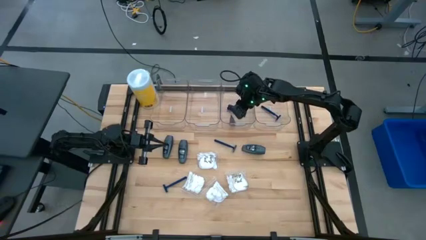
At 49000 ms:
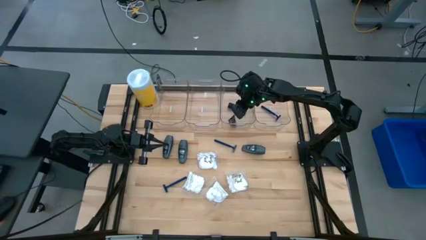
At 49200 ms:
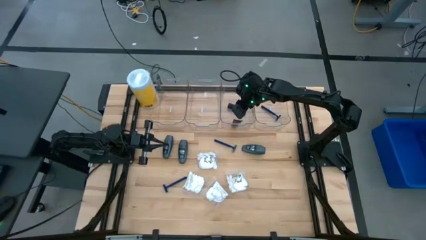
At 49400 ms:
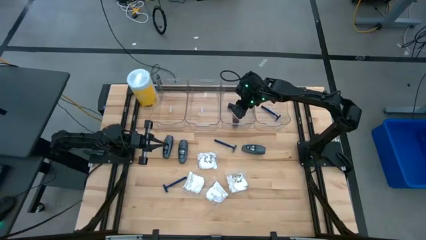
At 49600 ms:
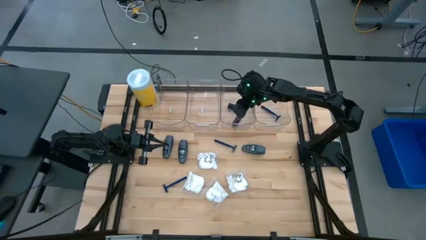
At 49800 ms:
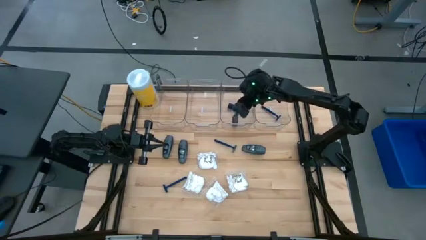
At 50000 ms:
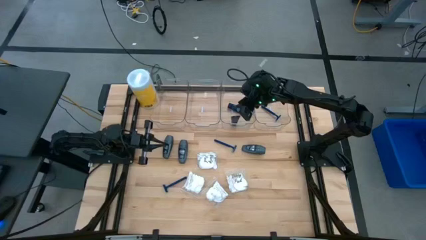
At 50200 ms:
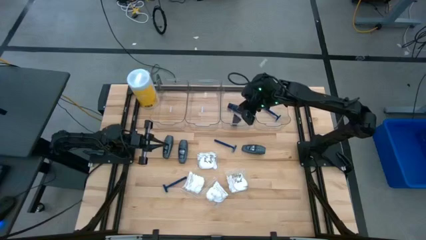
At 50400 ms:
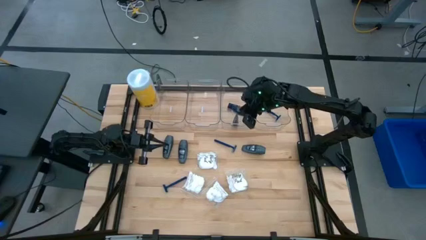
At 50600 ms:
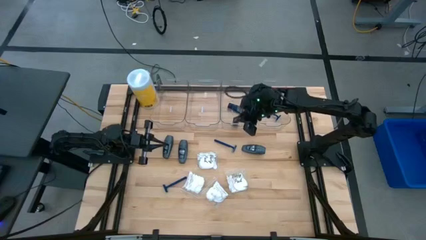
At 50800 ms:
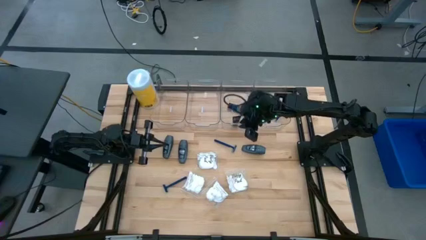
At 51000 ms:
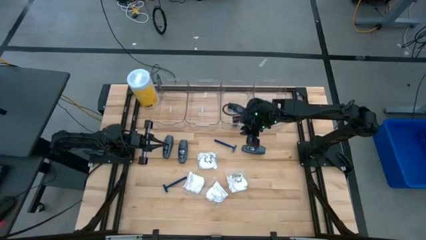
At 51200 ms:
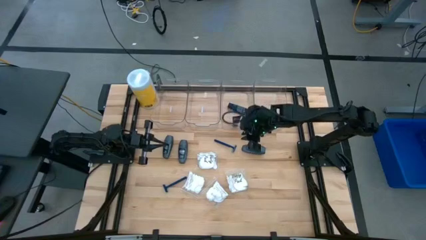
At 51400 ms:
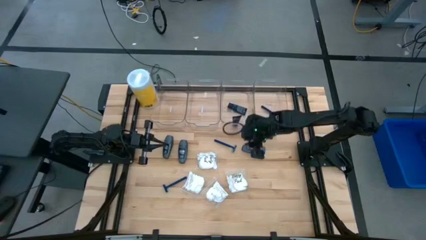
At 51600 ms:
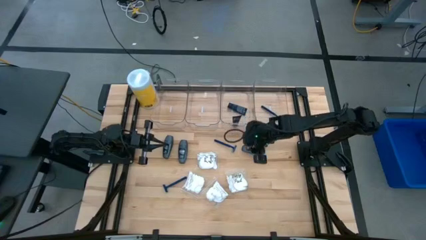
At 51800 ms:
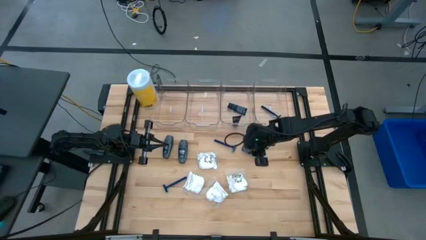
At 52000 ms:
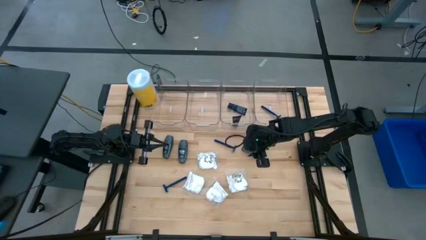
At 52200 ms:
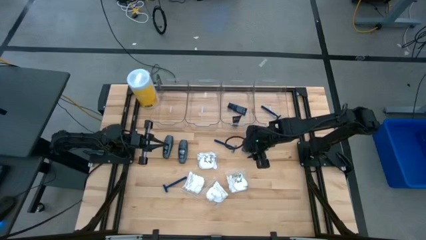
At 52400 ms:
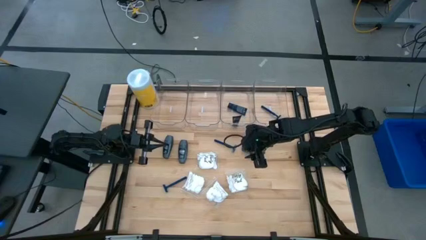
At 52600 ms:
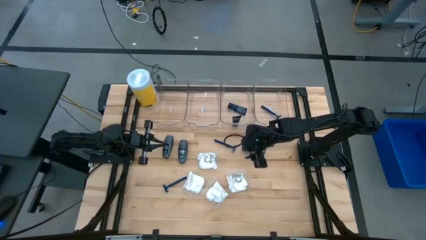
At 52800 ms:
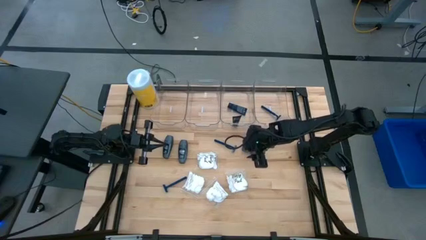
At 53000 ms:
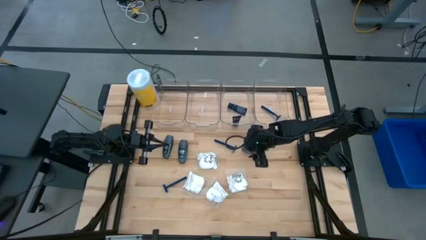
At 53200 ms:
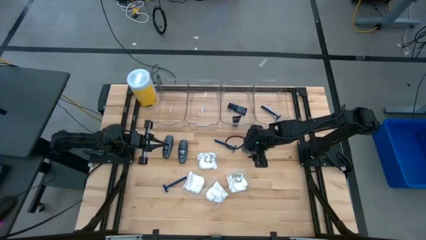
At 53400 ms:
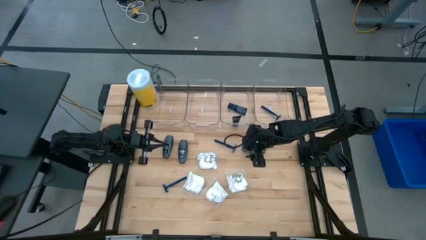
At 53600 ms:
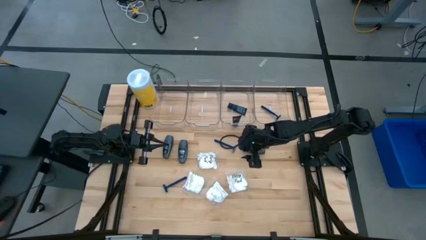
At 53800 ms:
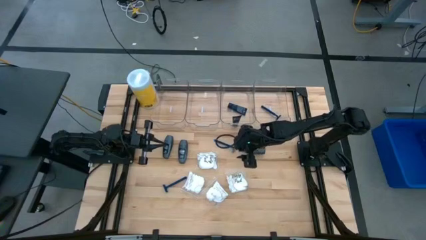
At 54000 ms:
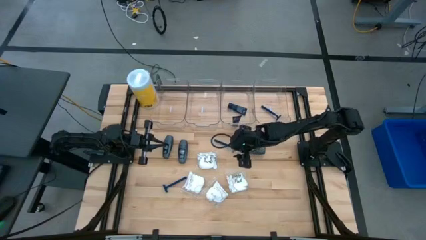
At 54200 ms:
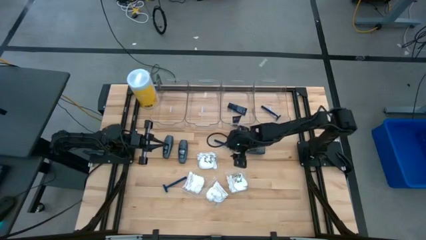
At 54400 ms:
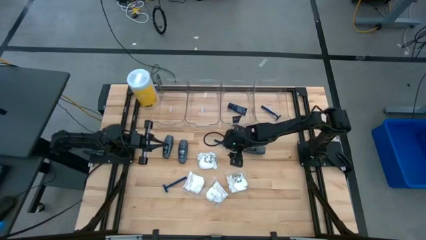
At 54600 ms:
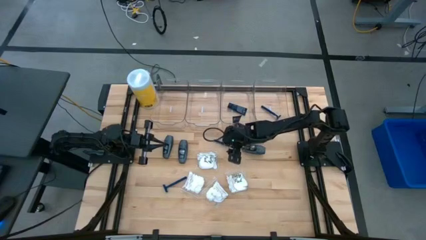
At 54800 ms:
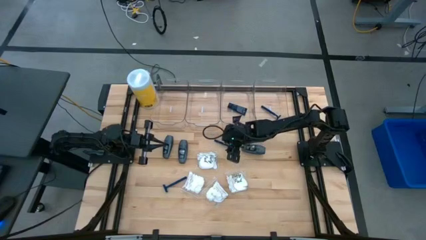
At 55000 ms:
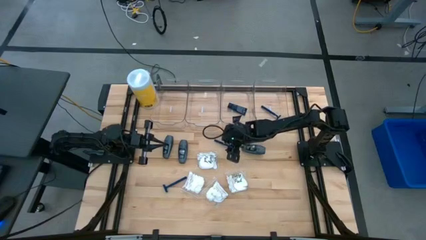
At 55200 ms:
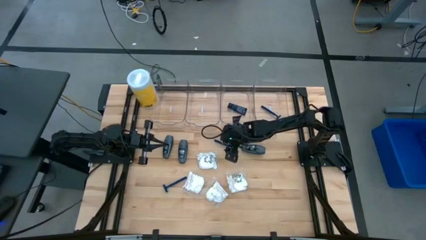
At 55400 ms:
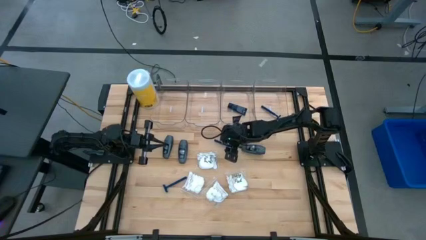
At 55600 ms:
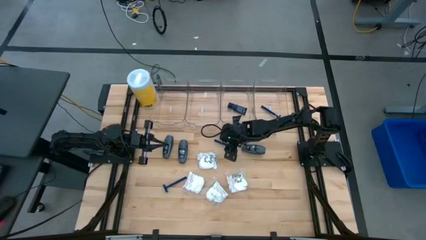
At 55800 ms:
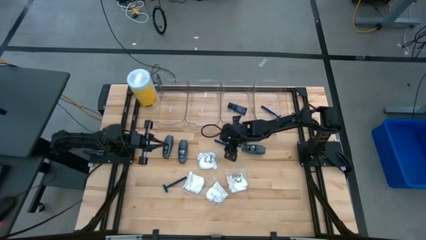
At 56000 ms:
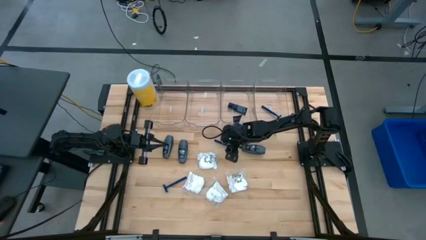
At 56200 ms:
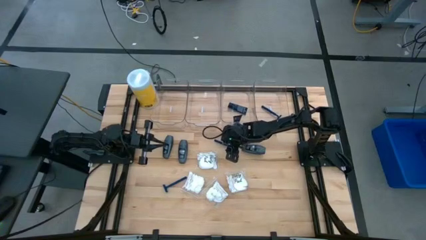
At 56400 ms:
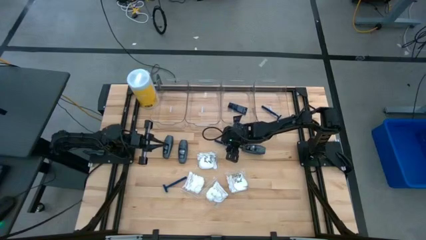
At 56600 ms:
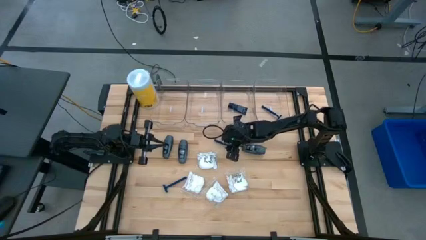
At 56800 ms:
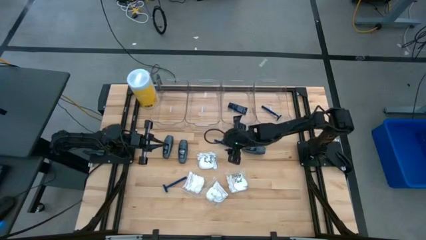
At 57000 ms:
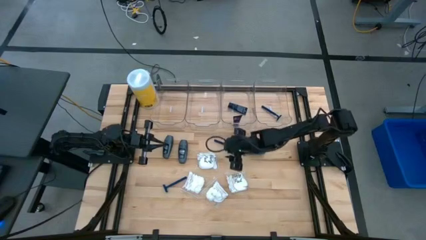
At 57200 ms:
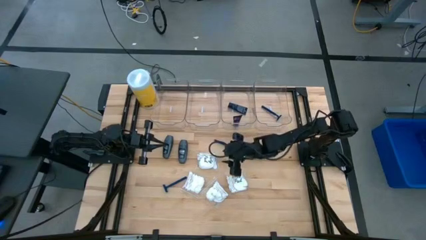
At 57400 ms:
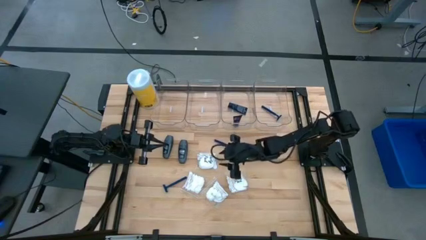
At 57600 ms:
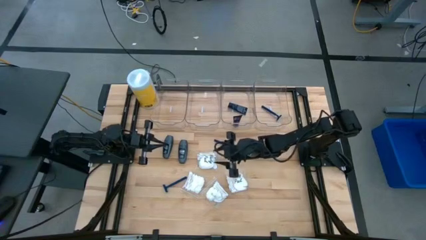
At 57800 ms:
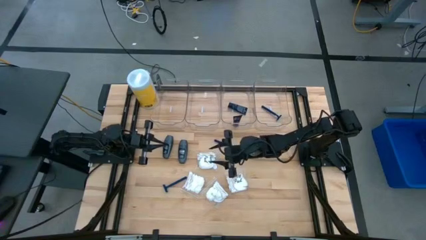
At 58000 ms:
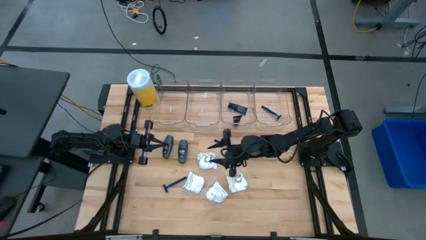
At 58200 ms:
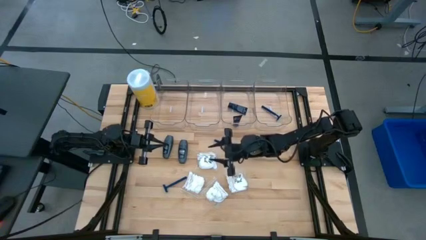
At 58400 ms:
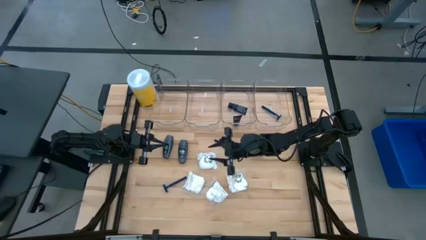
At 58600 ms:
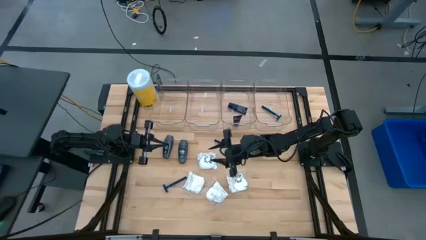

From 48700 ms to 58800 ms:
Task: Pick & Place Travel size toiletries
Put the blue razor into the right transparent bin

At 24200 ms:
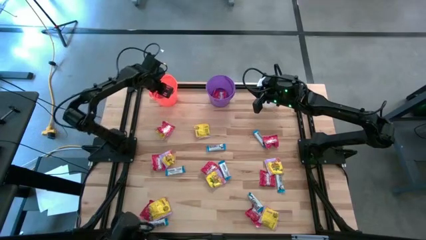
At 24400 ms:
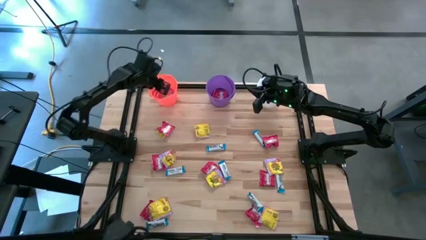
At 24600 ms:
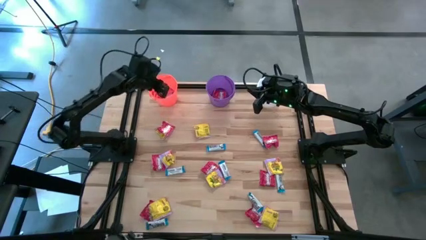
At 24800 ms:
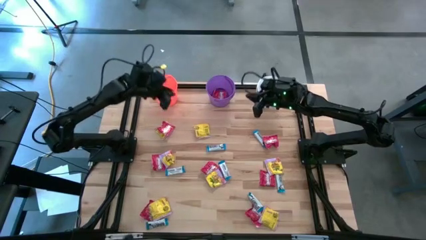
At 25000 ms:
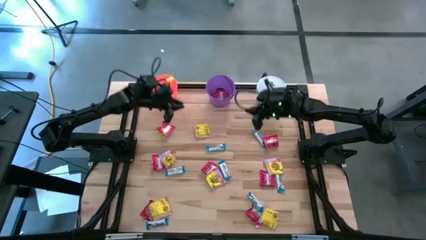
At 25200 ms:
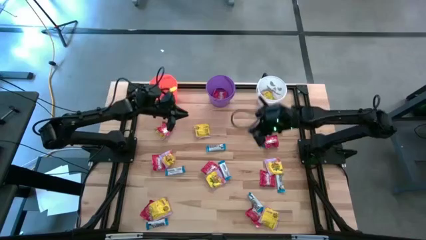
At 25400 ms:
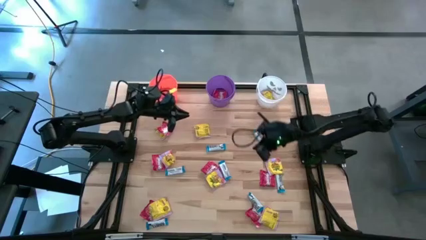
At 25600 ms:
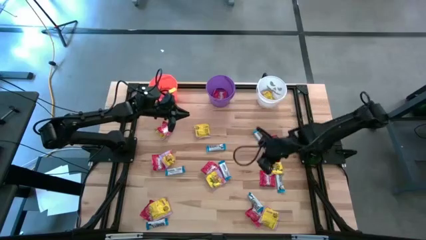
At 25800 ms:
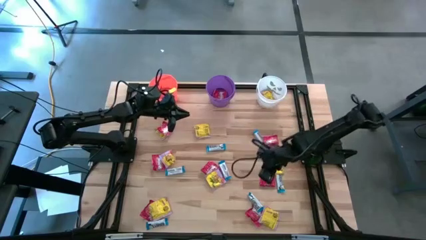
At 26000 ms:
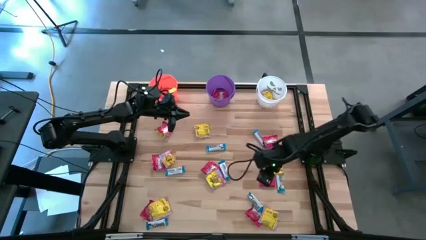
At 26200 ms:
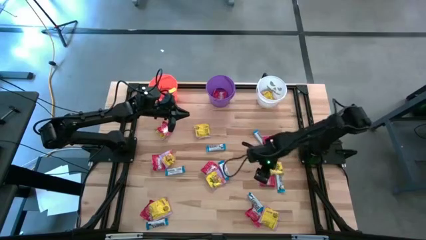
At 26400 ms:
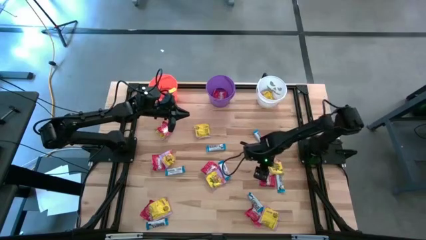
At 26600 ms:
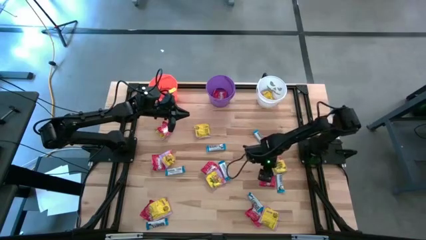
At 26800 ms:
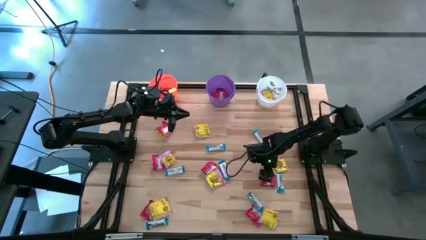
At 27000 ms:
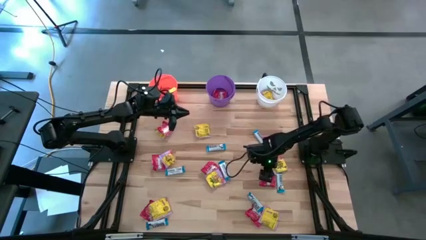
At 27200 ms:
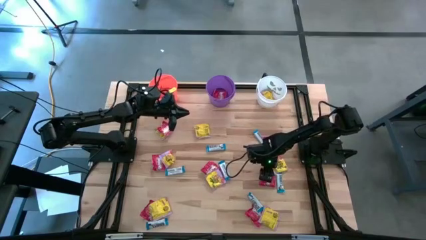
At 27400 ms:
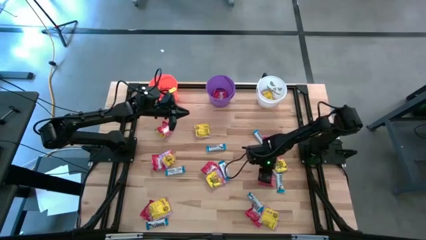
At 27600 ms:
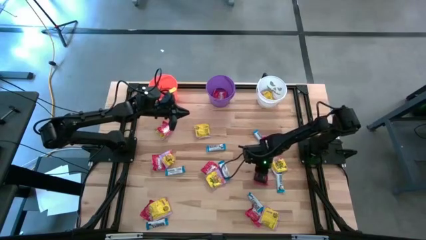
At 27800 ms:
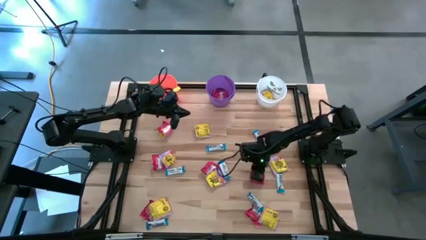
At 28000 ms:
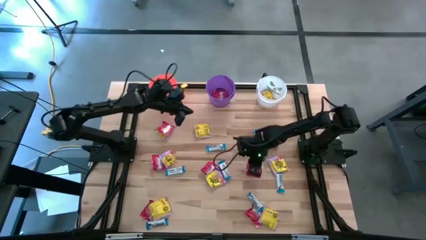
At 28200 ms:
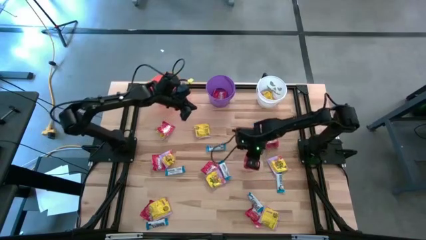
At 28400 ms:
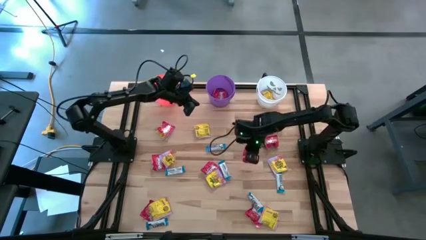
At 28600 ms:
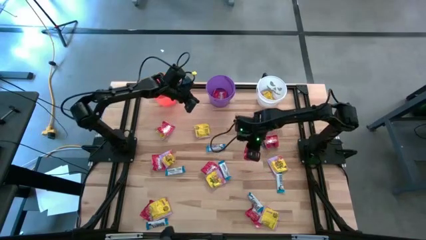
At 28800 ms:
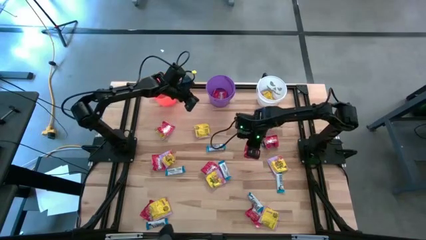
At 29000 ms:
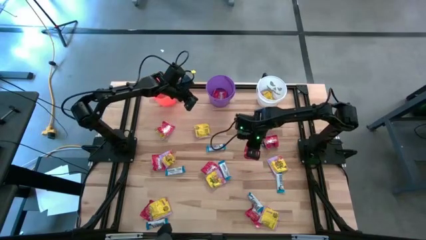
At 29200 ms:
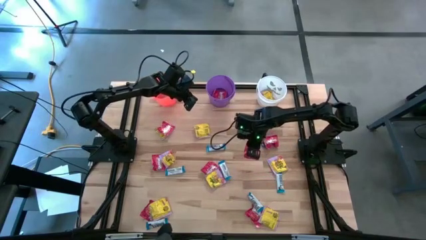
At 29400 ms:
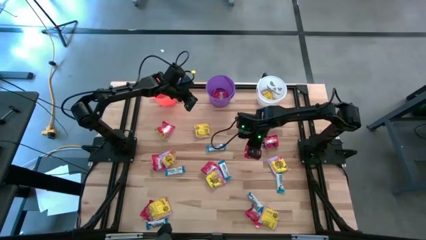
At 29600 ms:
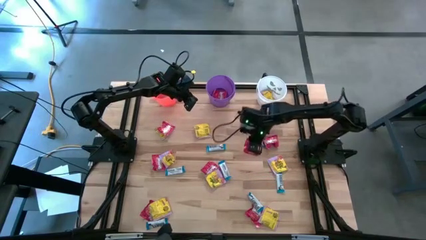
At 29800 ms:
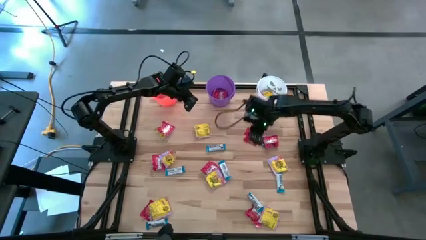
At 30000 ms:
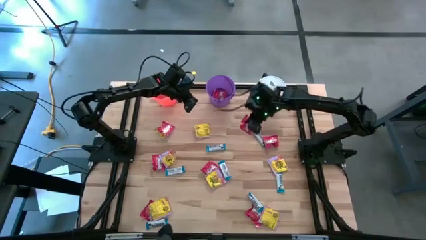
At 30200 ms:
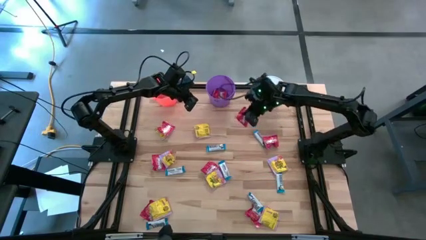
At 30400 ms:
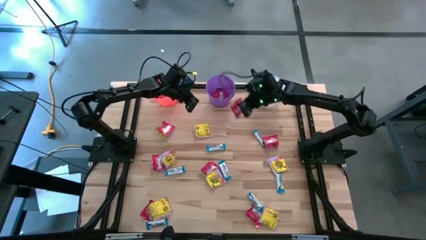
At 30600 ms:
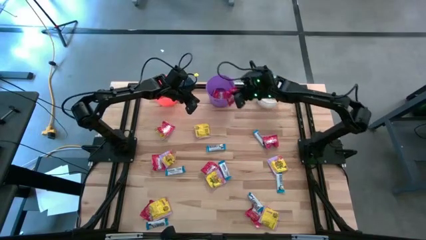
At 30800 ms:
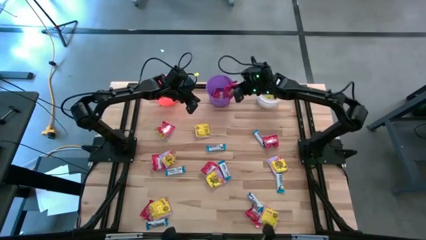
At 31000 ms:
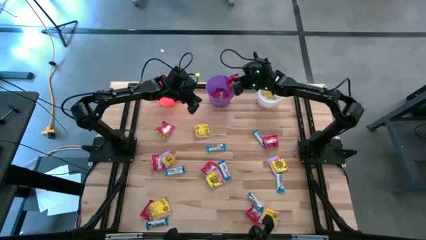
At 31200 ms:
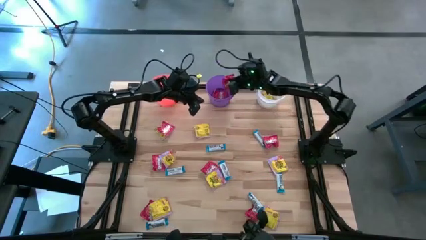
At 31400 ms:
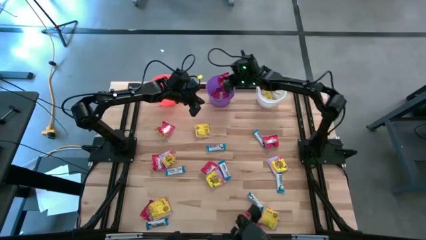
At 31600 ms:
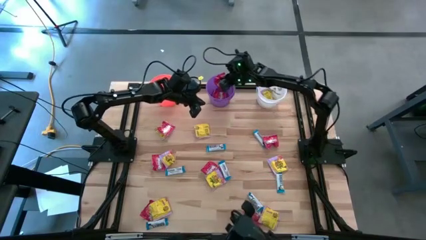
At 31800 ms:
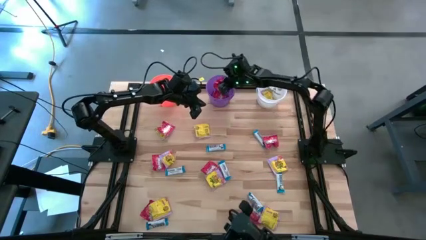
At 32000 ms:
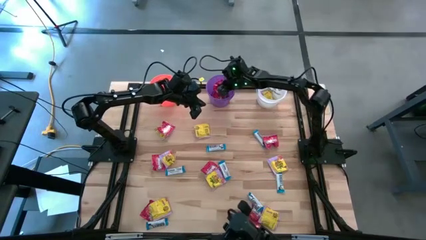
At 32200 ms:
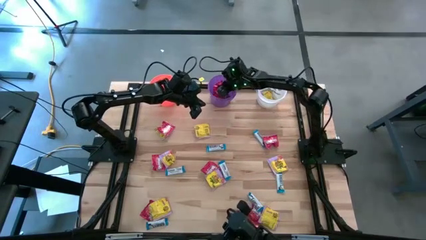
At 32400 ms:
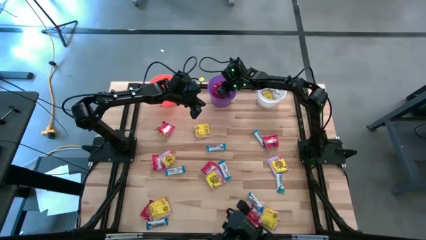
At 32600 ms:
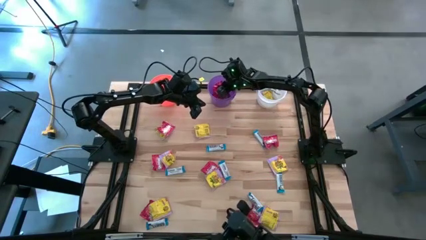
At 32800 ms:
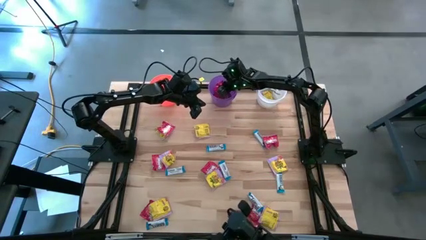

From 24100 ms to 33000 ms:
Task: Sort candy
Put the red candy into the purple bucket
